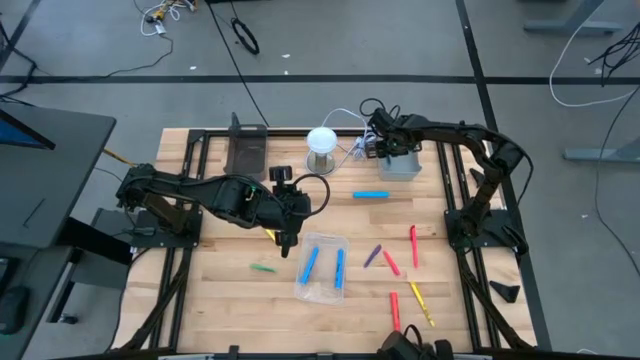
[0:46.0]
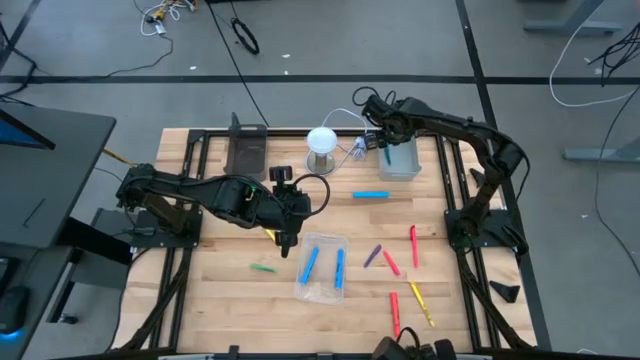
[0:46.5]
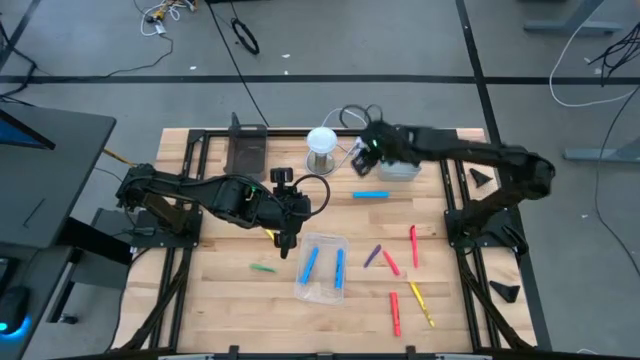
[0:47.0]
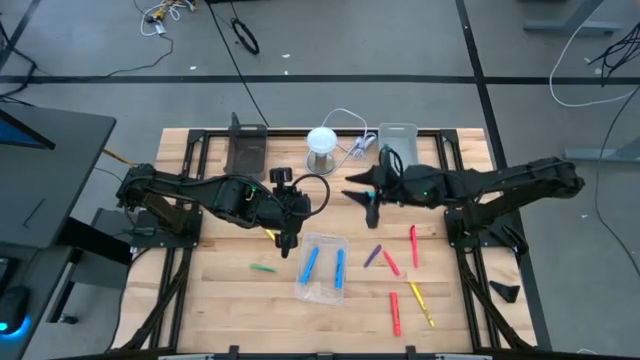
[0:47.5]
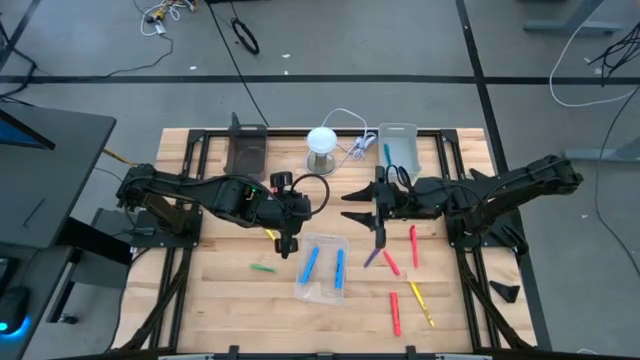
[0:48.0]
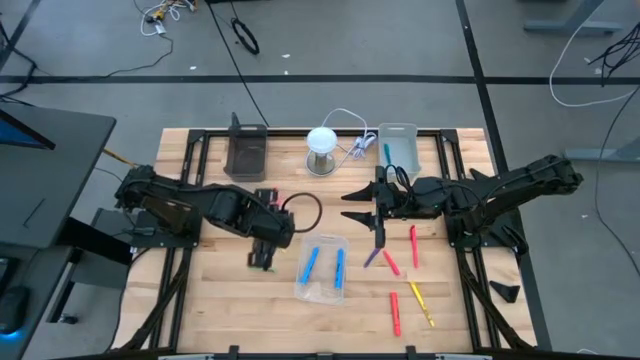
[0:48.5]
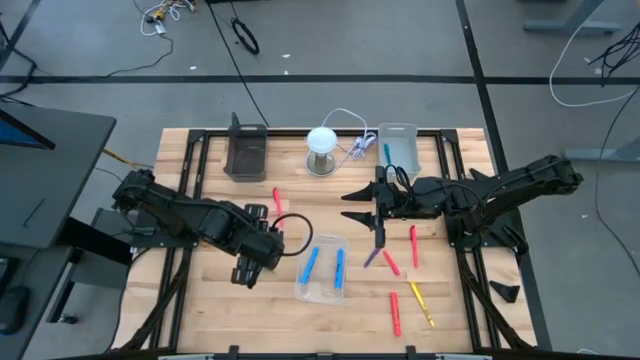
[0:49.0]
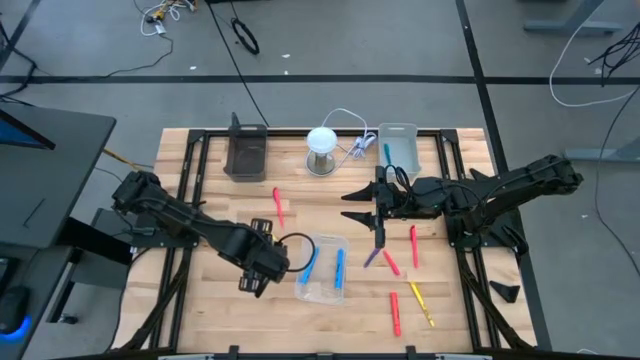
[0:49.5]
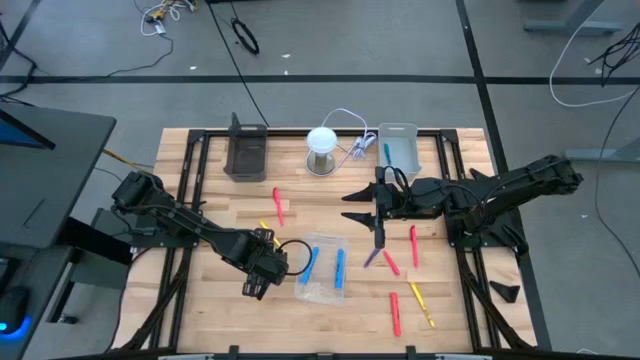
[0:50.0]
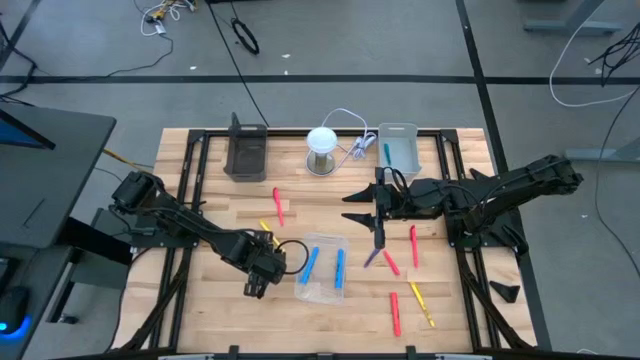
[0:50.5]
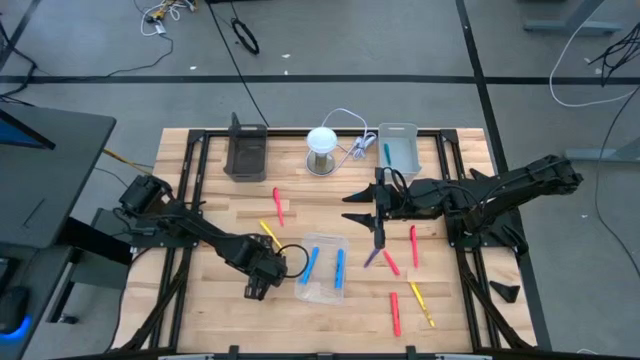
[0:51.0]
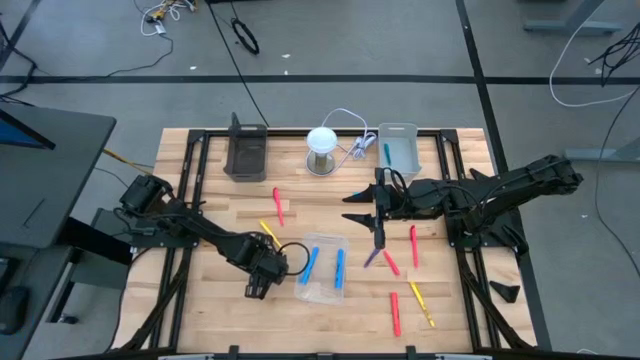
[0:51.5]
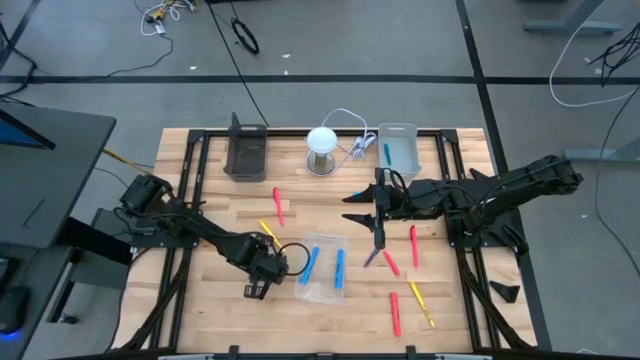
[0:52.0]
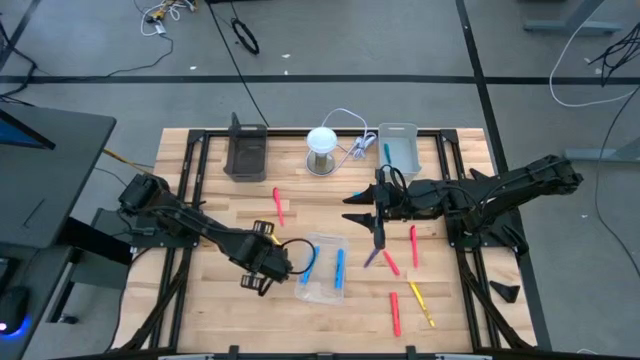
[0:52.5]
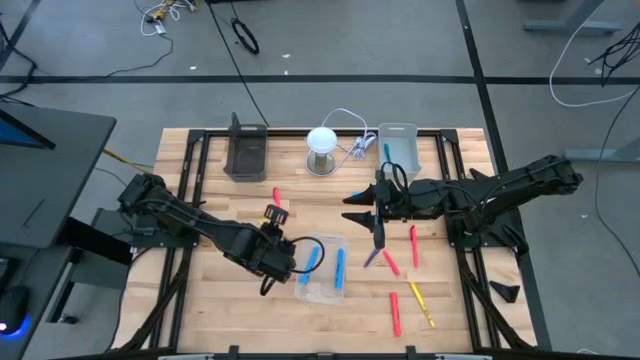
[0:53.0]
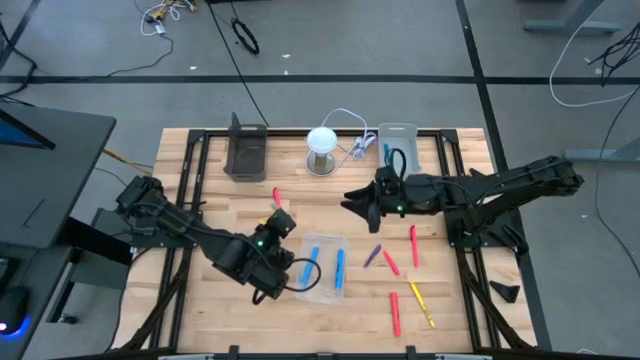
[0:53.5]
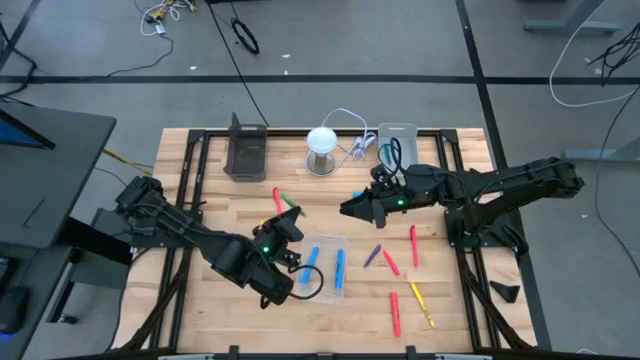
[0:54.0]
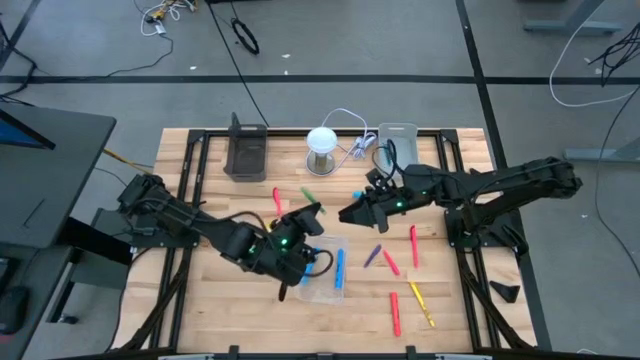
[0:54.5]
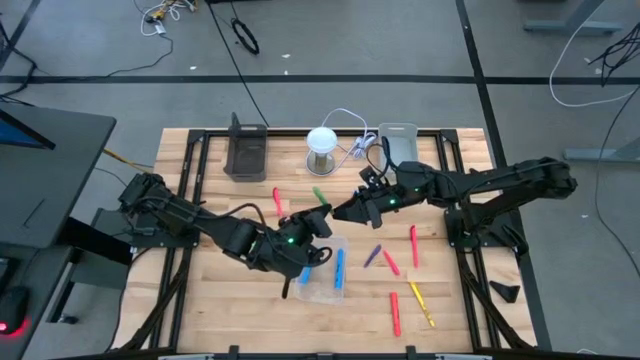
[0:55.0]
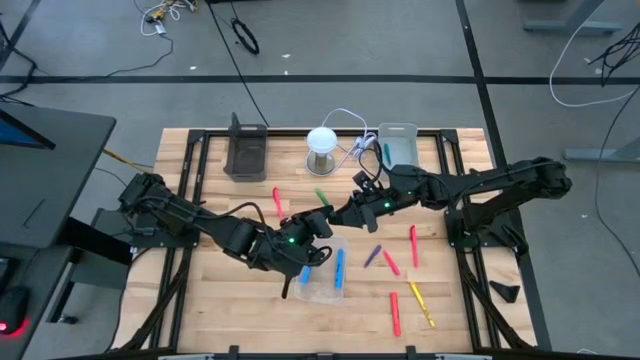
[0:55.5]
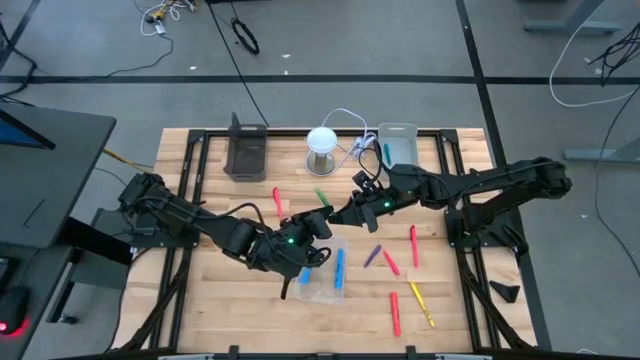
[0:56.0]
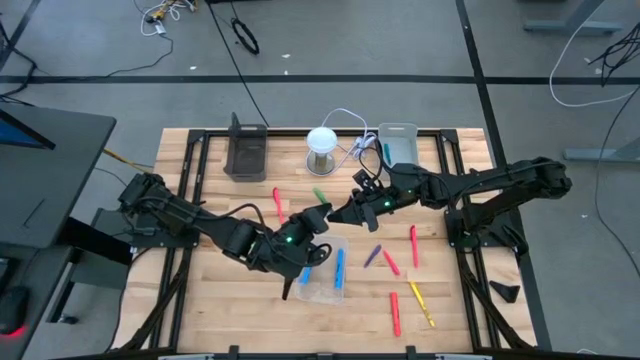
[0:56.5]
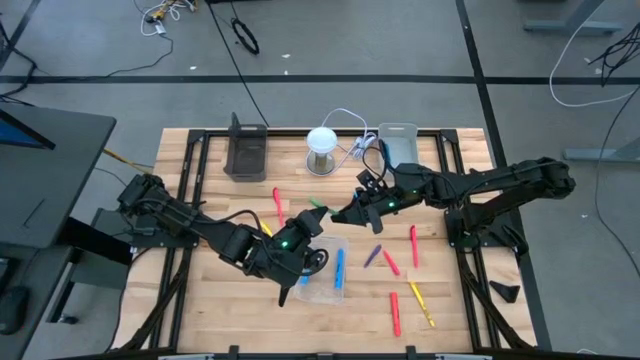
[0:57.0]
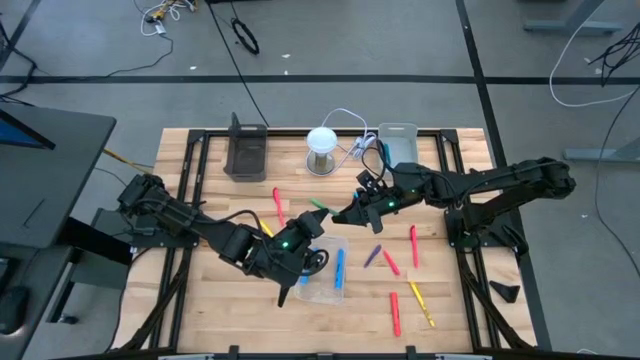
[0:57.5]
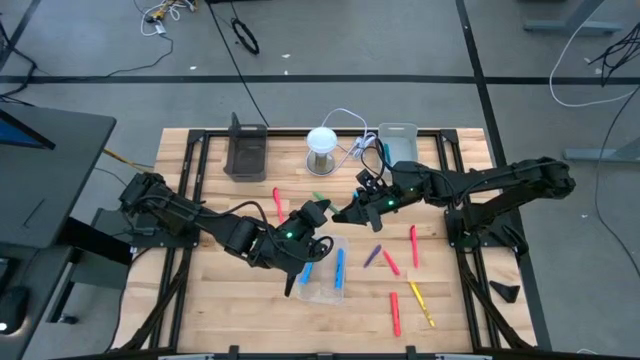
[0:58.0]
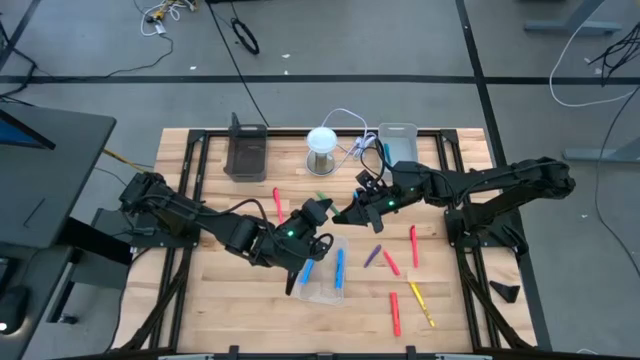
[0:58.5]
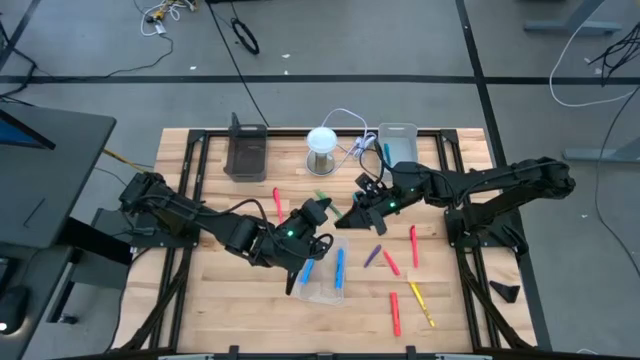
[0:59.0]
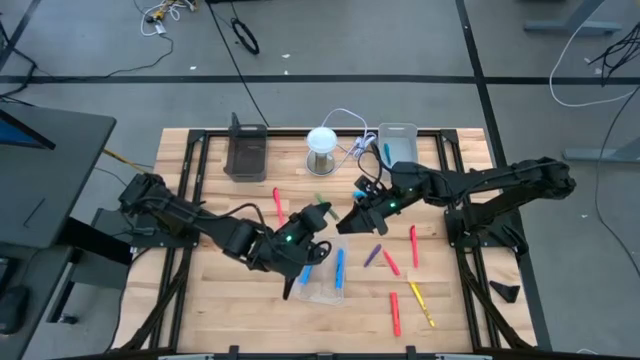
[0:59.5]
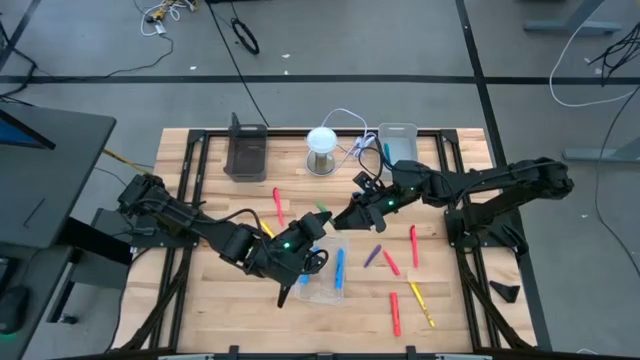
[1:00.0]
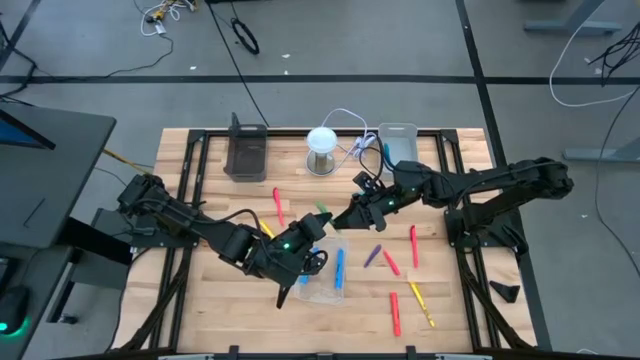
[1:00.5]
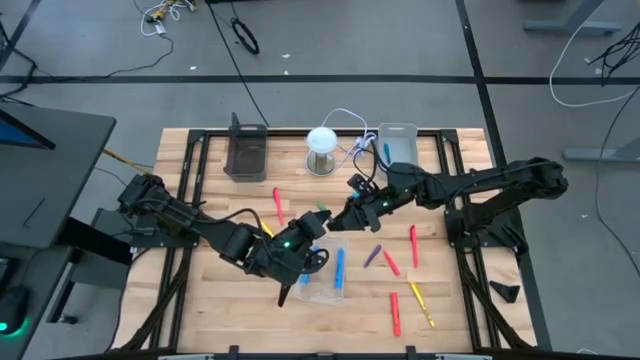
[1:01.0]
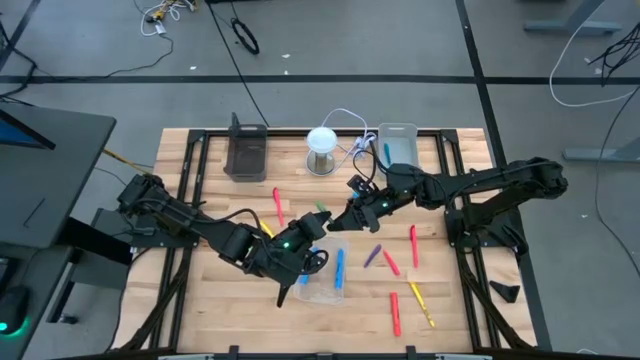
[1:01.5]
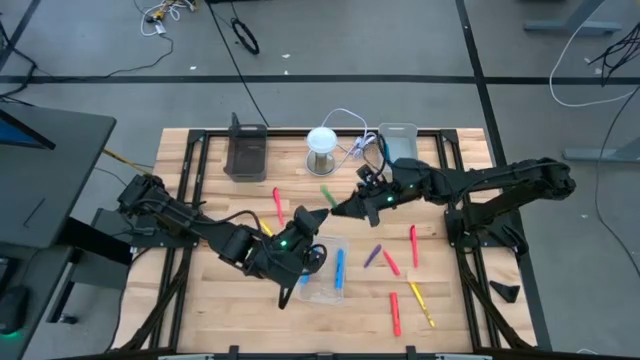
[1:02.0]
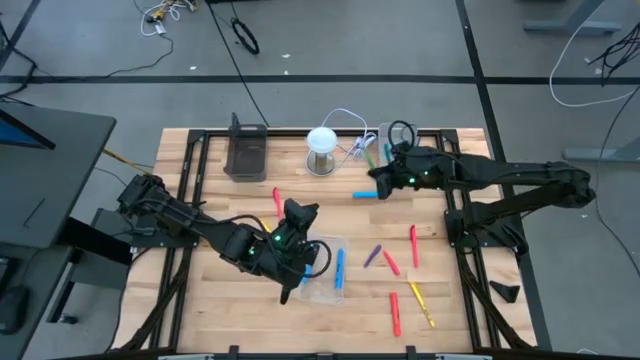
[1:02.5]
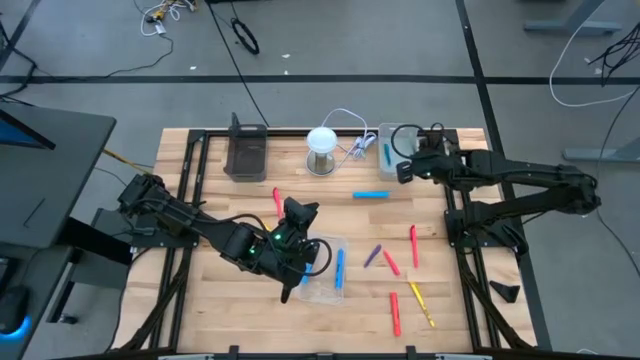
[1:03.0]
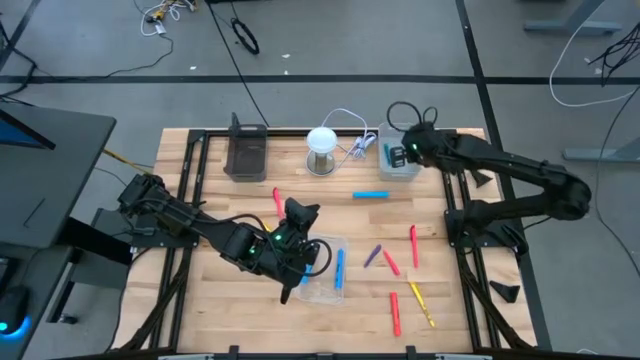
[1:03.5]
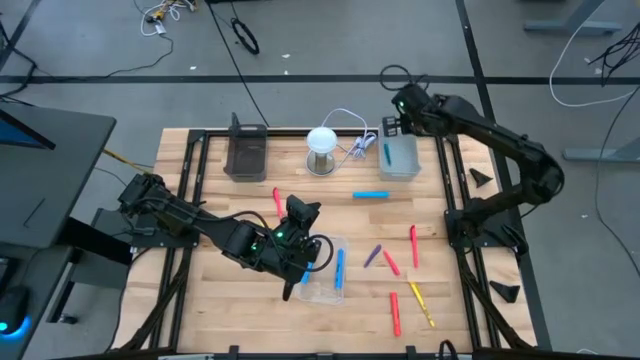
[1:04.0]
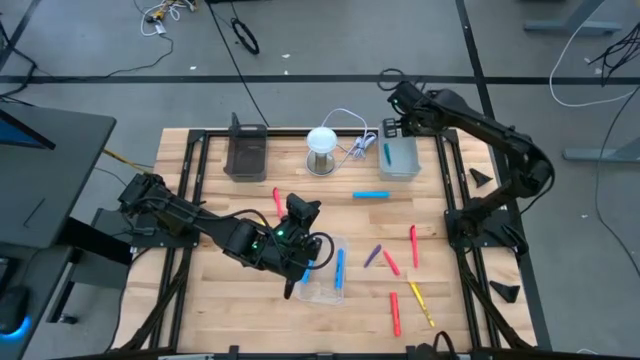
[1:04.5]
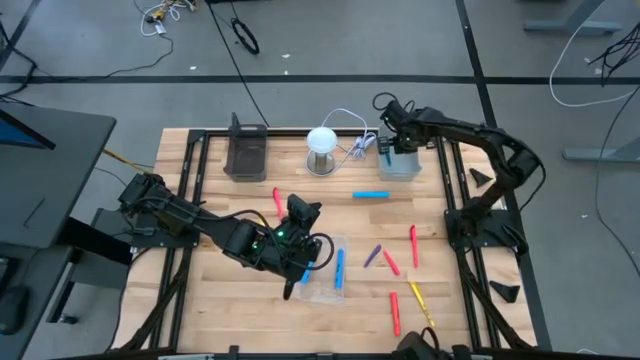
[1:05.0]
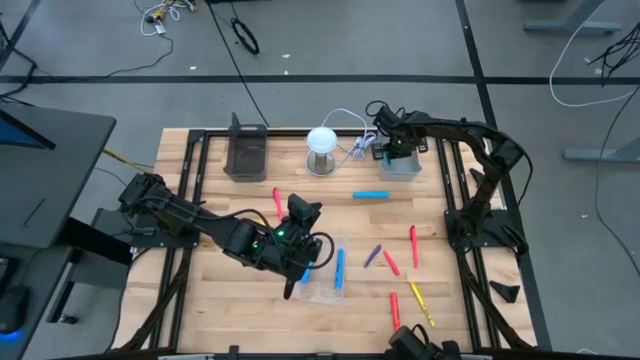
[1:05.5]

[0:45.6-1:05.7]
Task: Pick & Place Markers
Put the green pen into the gray bin
